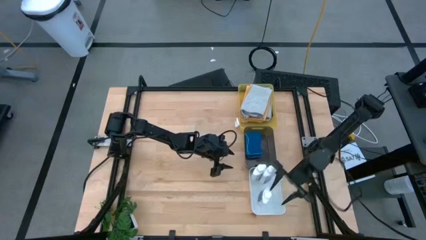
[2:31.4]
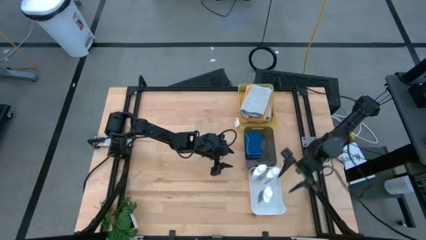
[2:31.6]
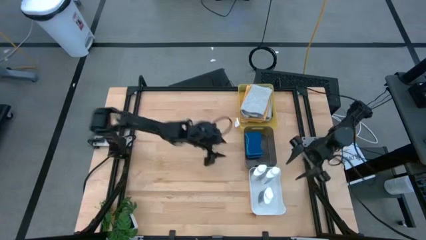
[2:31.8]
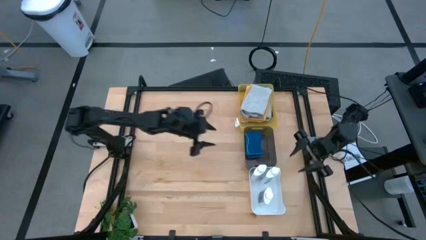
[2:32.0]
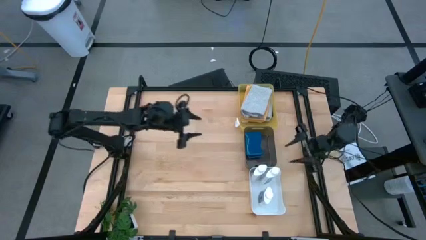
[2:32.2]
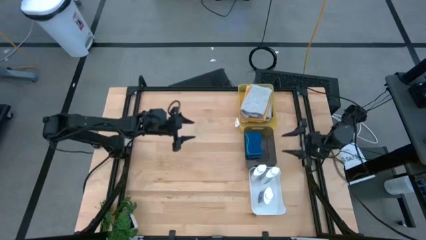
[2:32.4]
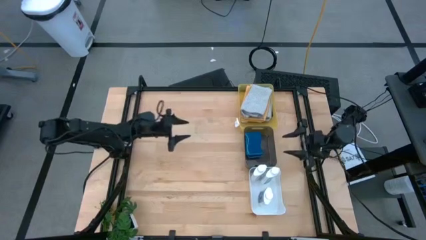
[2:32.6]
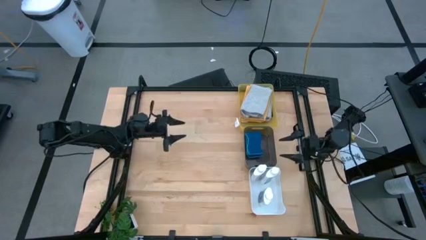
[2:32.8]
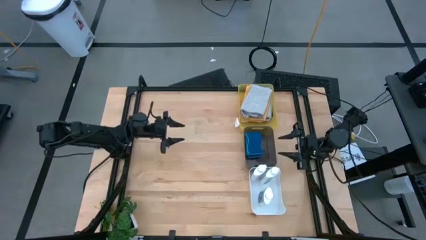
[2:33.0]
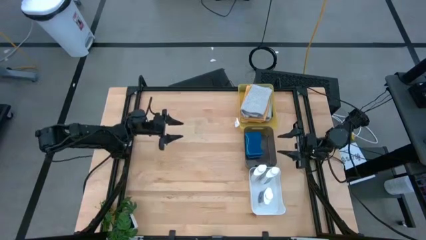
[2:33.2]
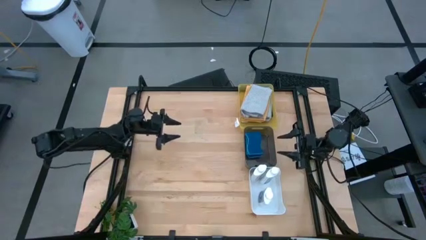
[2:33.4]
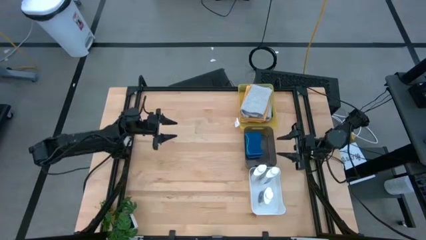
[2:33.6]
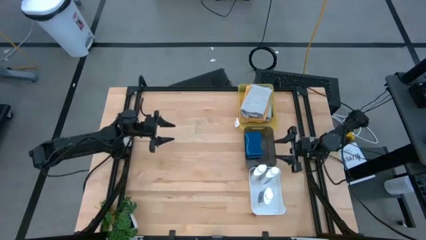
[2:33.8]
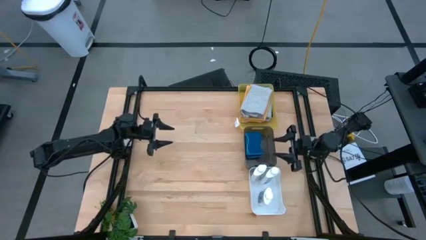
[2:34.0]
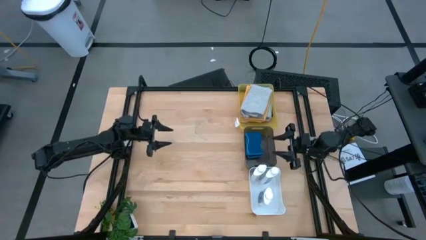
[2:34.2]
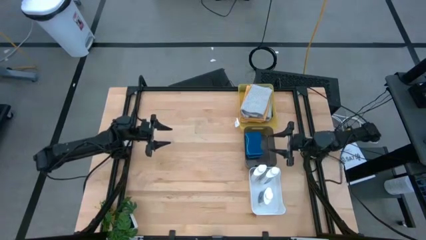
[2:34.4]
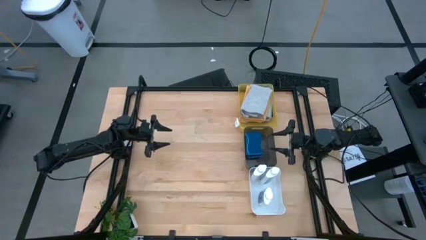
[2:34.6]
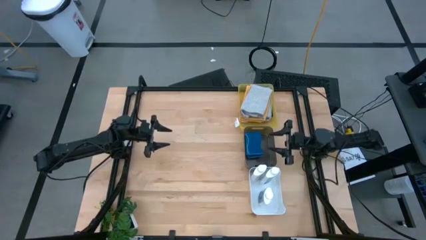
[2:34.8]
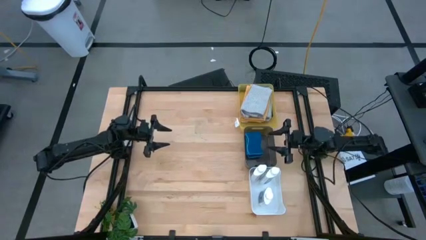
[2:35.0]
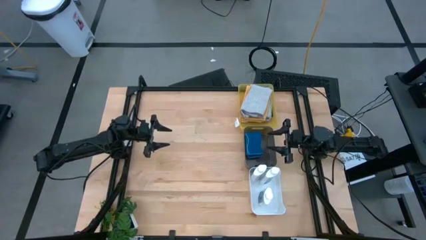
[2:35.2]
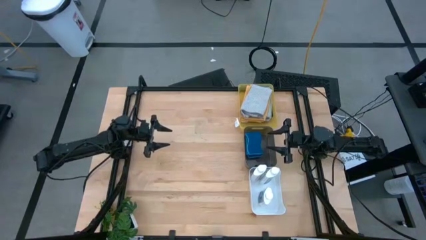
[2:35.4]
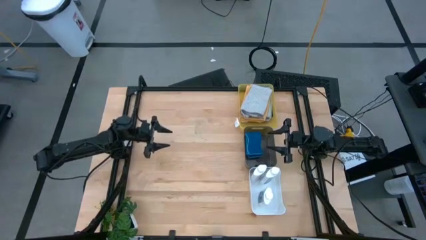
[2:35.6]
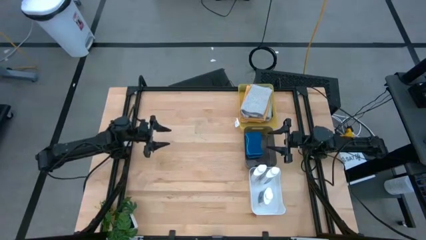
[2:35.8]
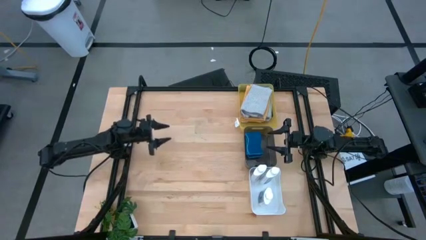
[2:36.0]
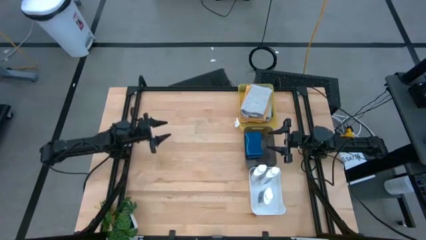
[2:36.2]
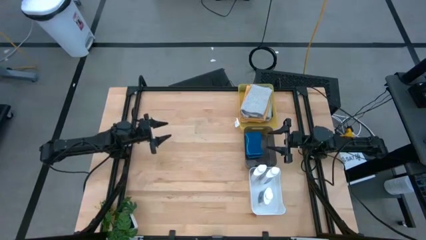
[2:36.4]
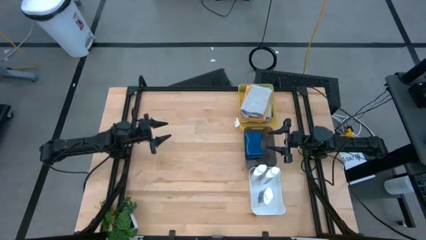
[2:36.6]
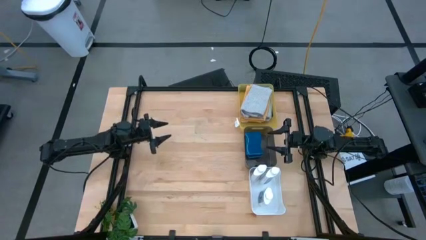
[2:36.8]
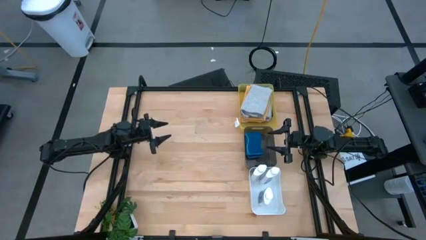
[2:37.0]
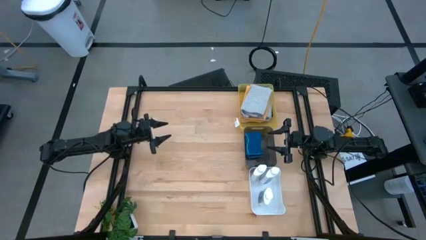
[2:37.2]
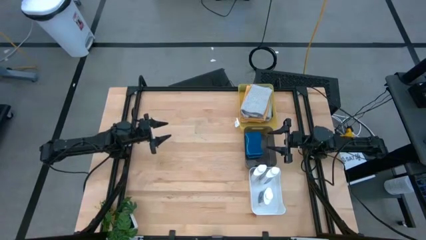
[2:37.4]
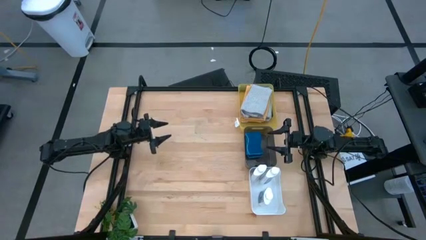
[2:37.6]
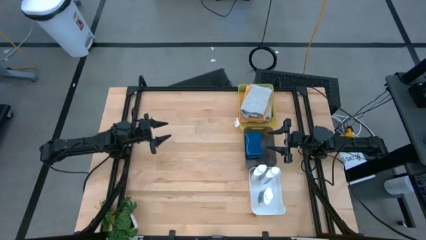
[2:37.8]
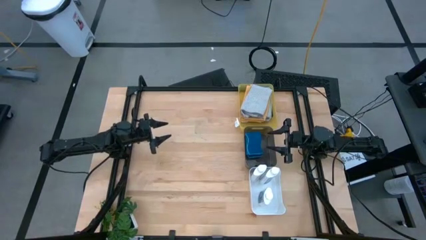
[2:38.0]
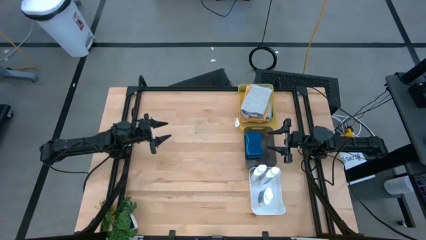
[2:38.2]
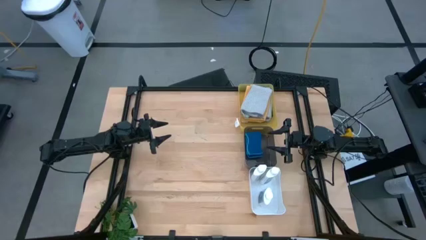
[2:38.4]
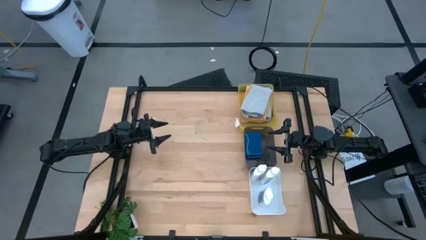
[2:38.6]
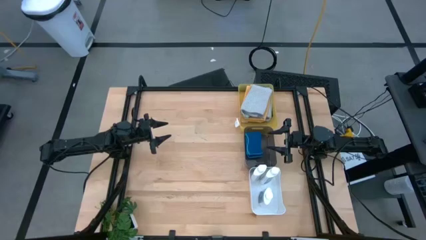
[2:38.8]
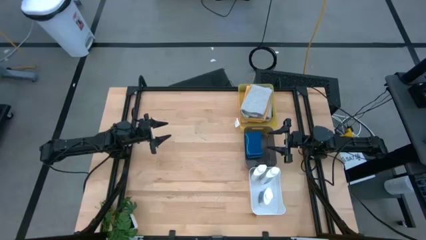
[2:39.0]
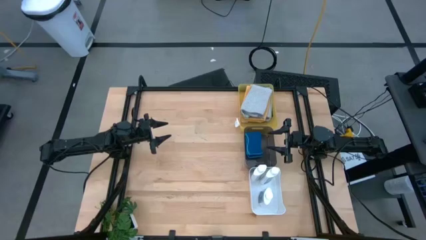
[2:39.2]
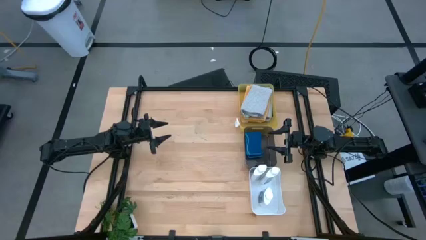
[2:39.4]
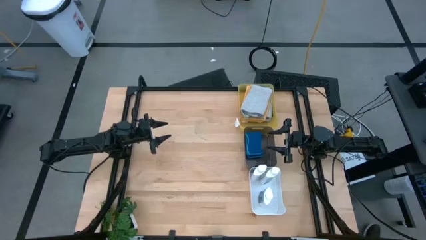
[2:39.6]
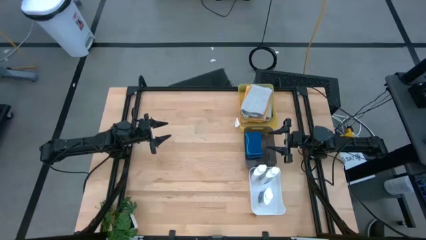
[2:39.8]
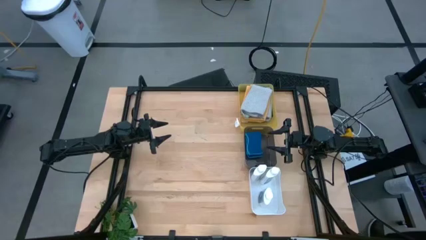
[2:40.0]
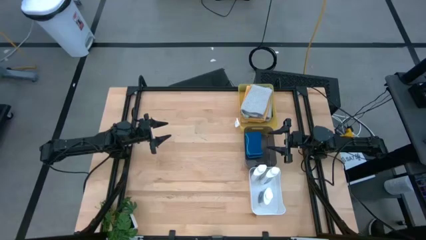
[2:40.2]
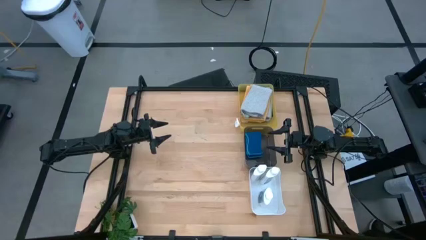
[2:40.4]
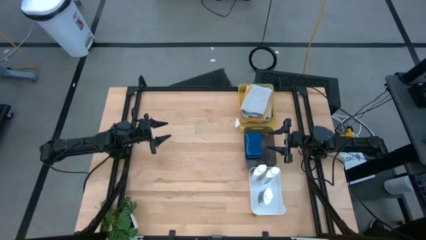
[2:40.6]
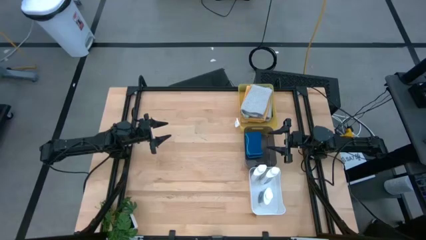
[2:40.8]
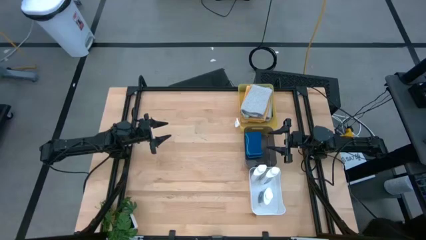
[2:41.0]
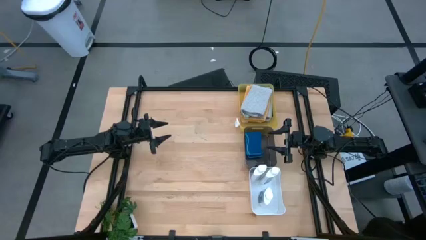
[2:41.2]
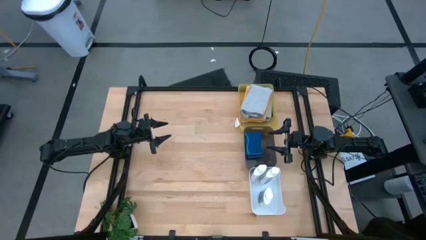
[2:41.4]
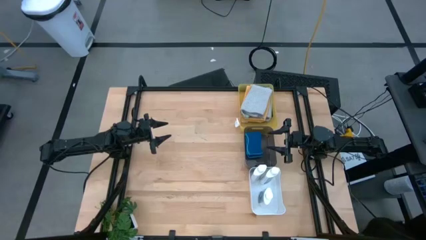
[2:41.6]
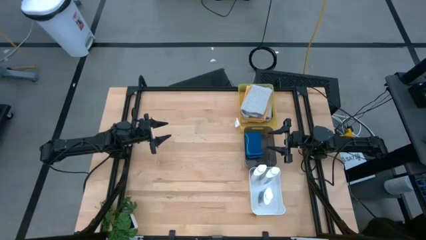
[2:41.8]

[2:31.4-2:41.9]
Task: Pick & Place Kitchen Items
Return to Home Position

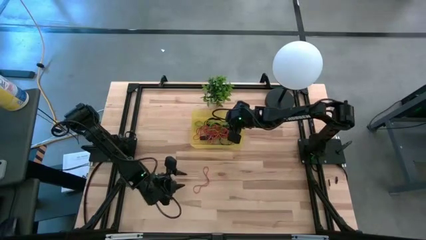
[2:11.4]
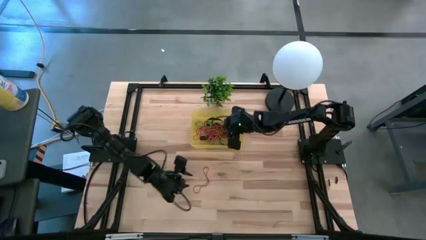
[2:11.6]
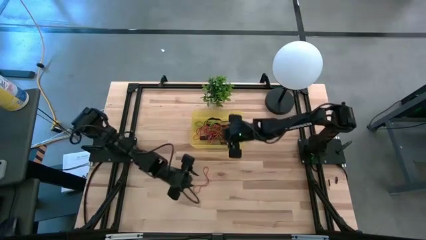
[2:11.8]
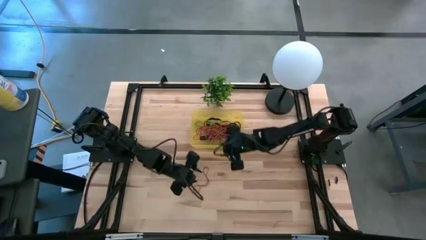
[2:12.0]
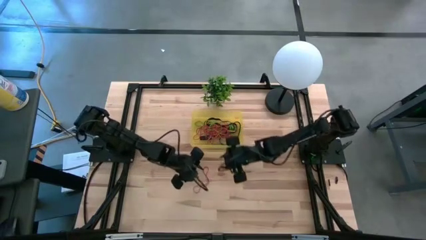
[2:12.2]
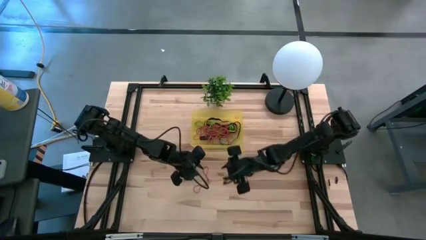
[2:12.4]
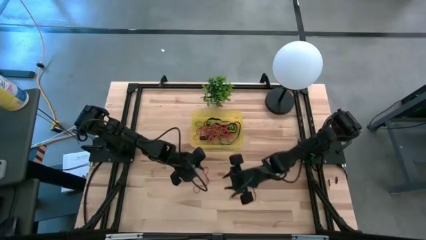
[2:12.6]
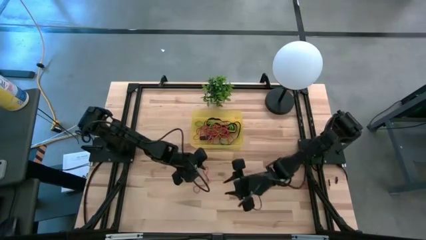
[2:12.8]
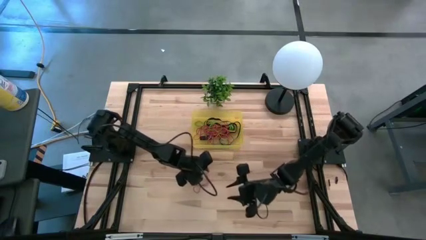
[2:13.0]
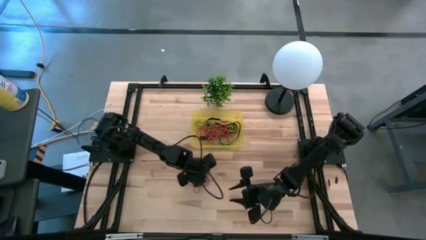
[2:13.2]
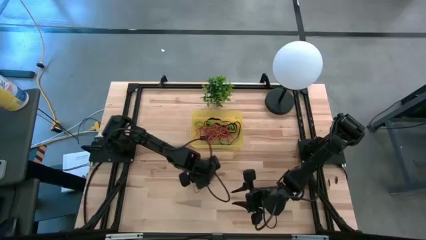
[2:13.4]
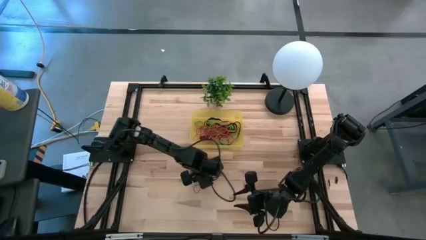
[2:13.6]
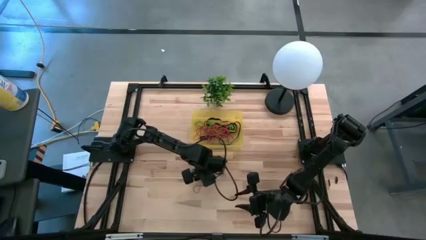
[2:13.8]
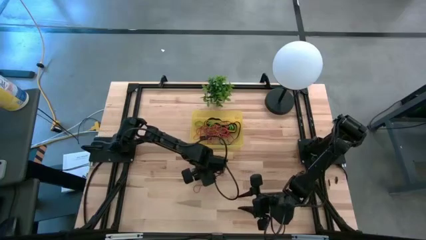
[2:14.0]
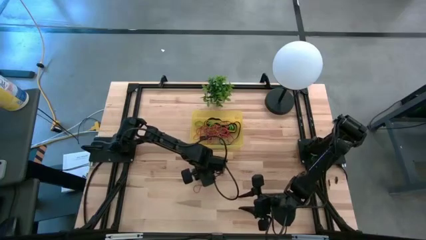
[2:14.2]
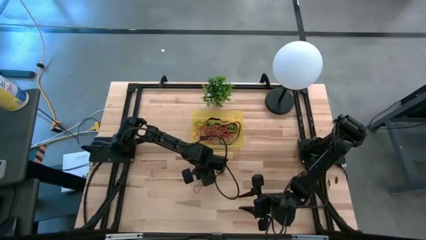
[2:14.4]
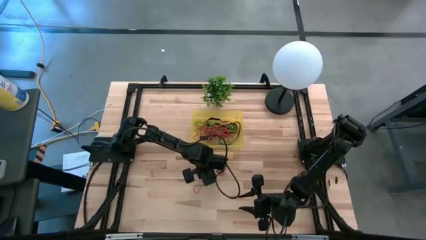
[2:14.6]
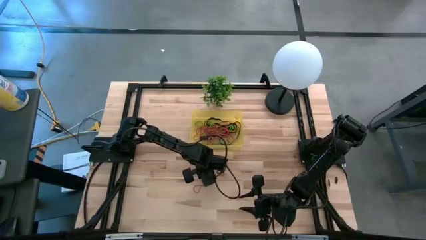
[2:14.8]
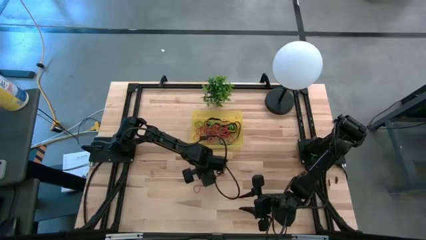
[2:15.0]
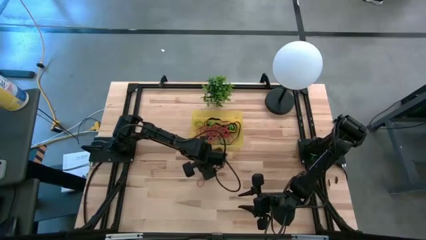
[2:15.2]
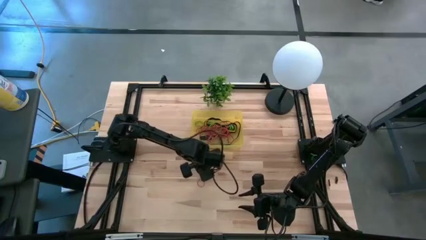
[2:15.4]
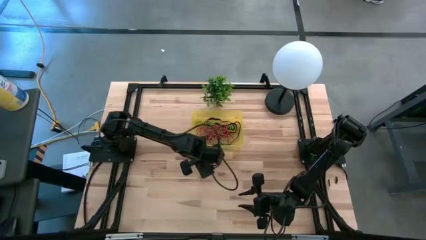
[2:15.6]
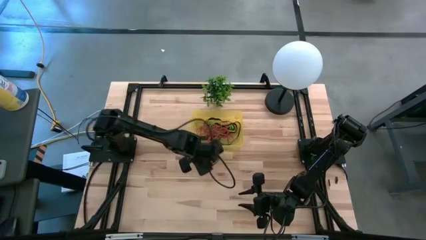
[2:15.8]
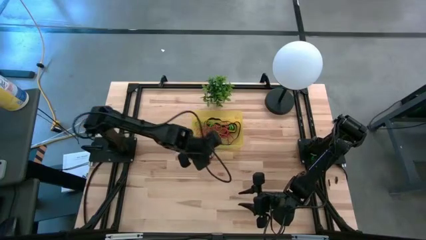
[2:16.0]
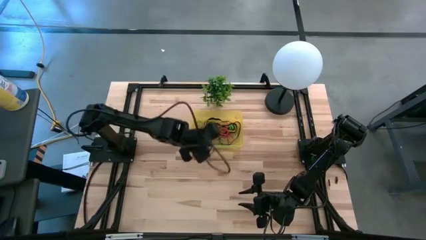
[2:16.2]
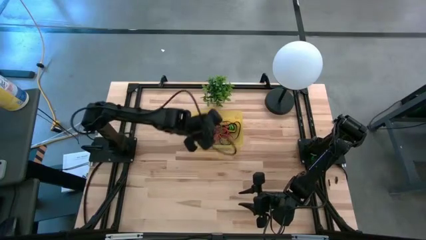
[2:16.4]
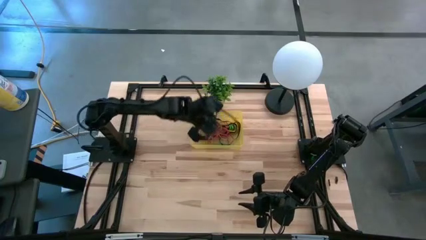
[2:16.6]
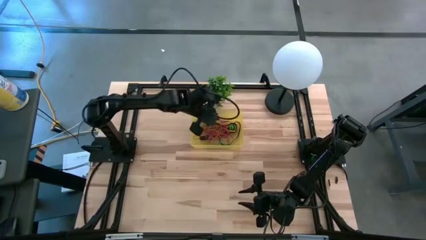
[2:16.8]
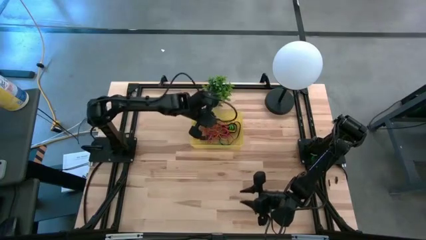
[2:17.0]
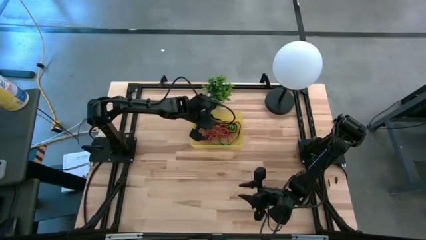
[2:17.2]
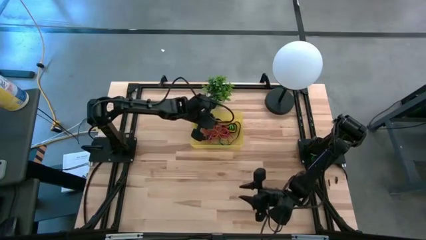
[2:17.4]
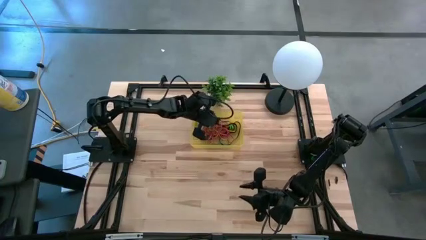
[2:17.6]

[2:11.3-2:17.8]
Task: Pick and place rubber bands into bin
Put the red rubber band into the yellow bin
